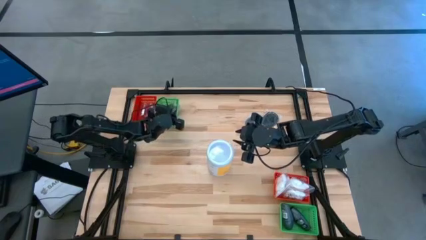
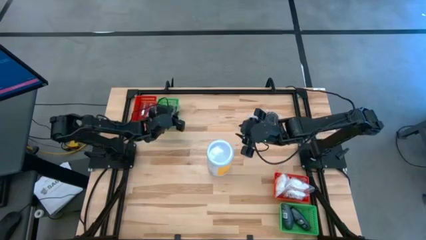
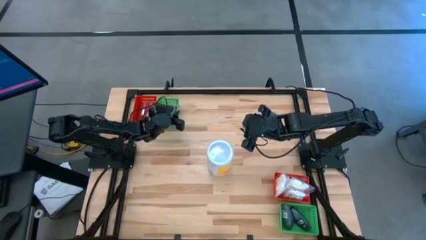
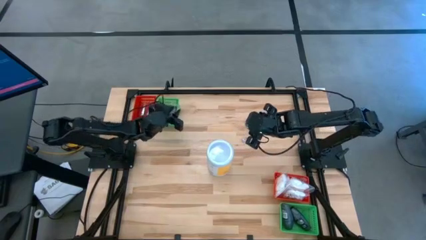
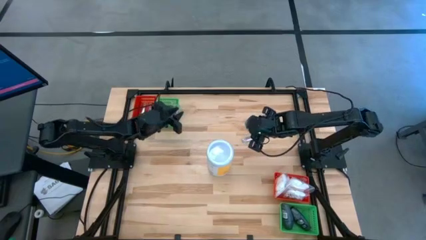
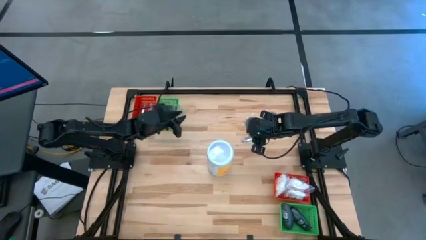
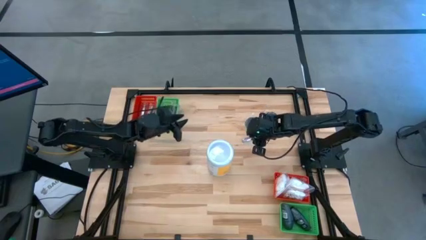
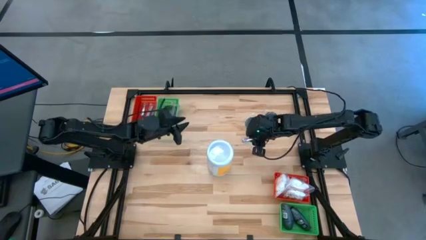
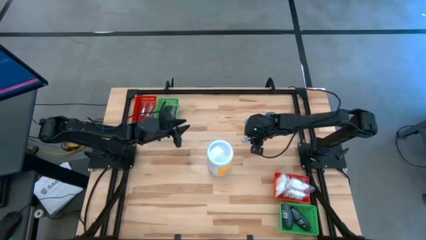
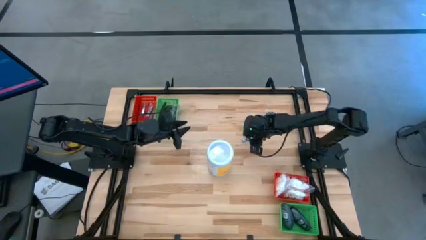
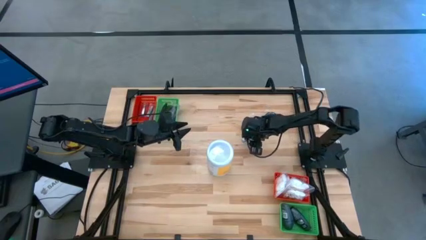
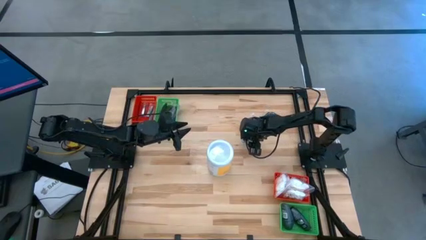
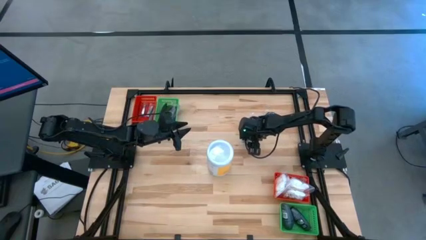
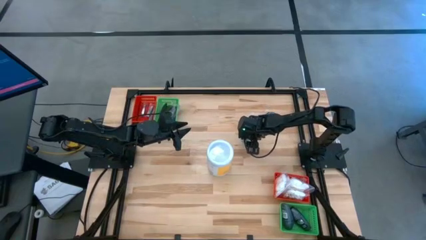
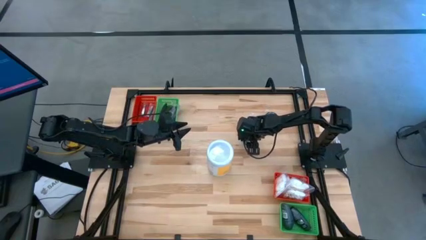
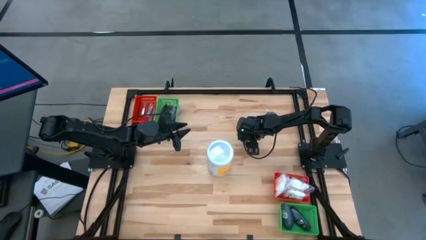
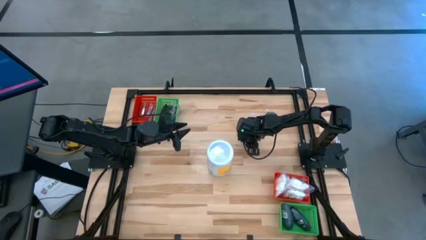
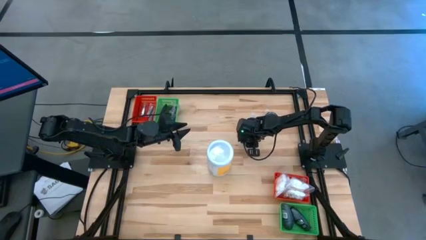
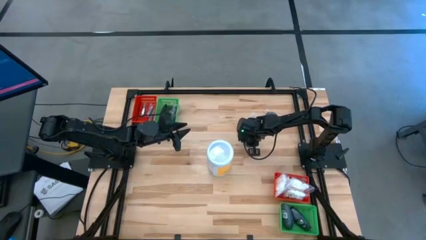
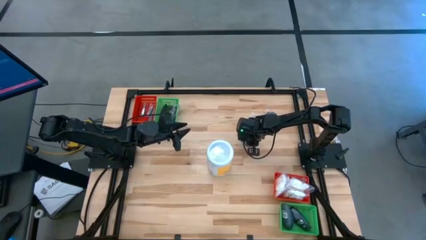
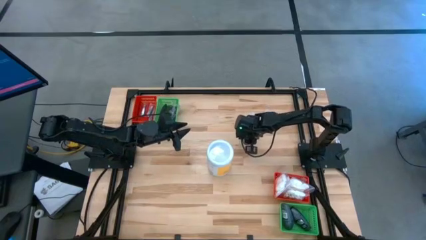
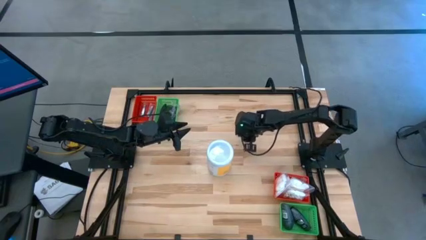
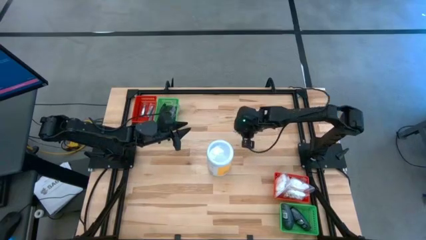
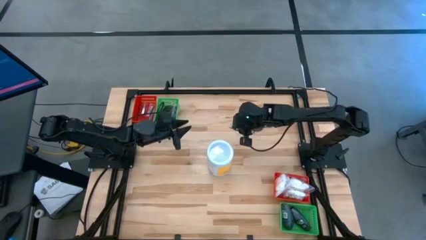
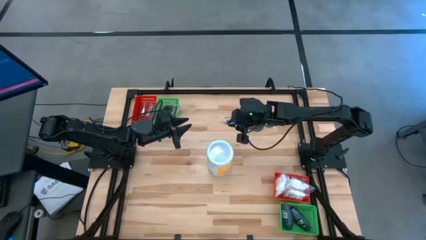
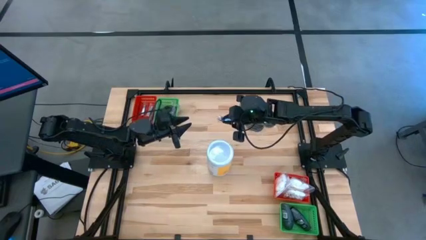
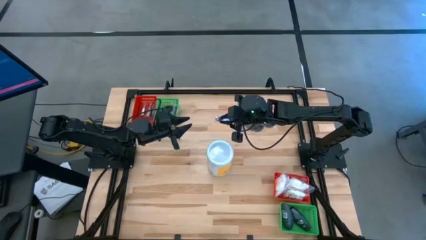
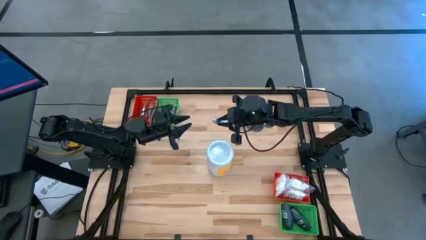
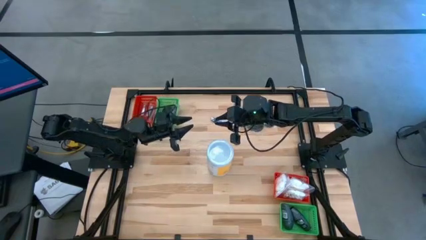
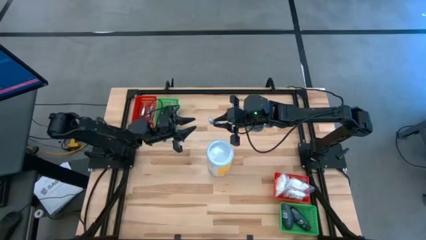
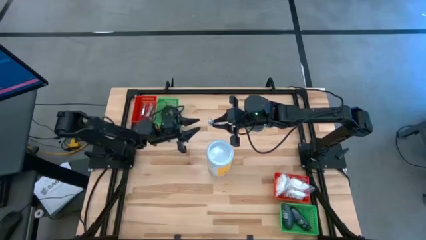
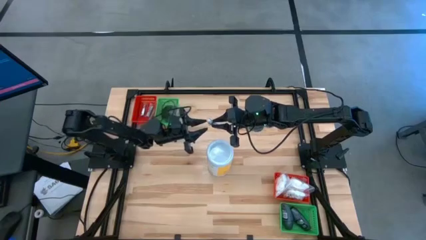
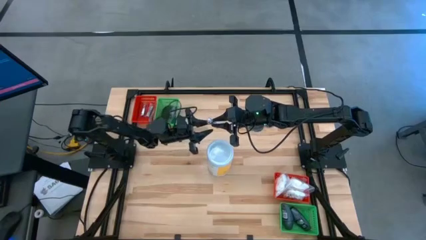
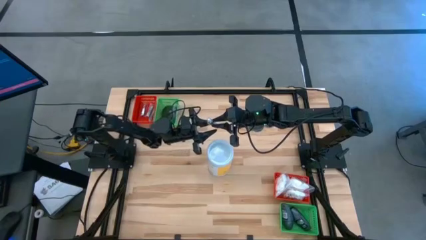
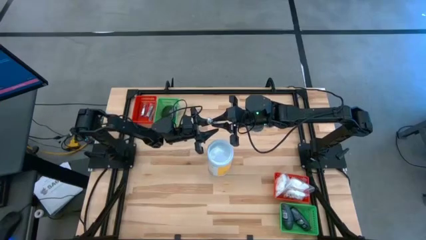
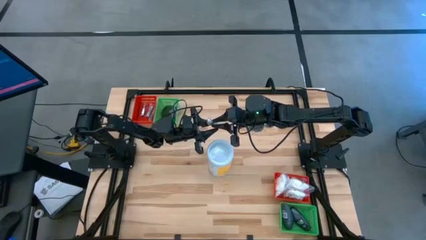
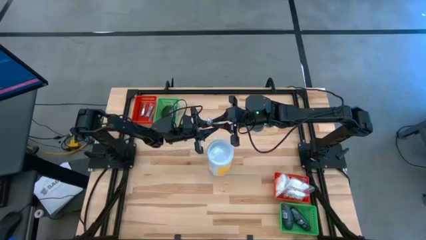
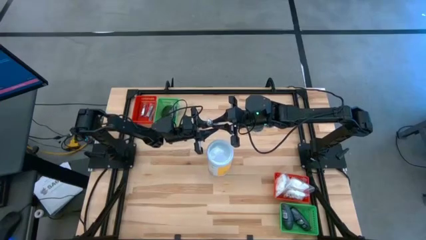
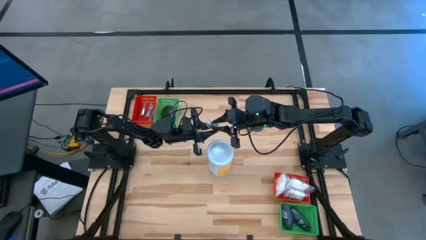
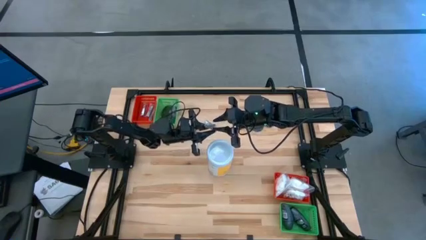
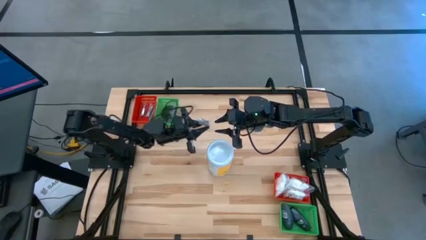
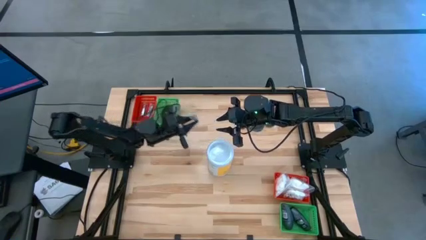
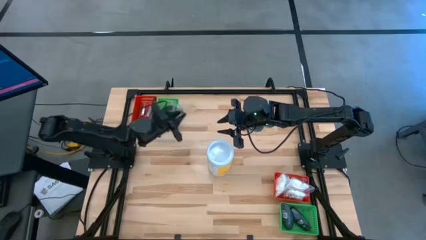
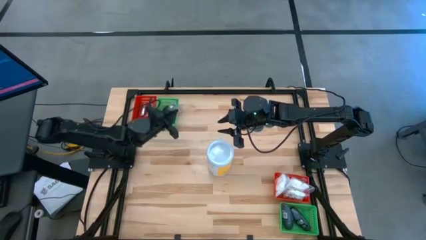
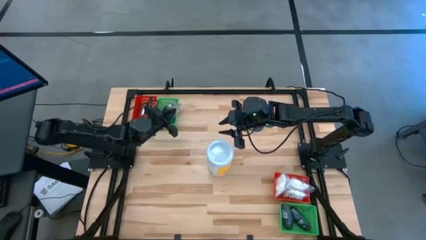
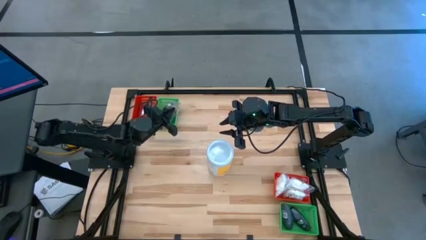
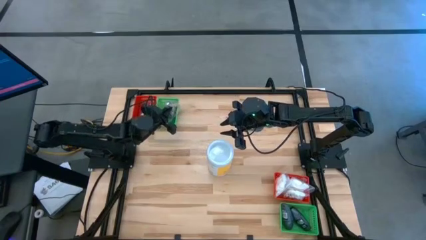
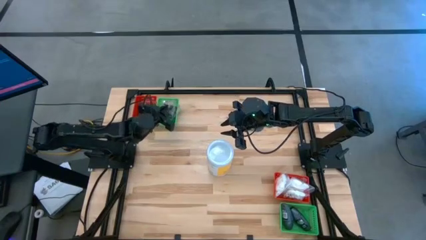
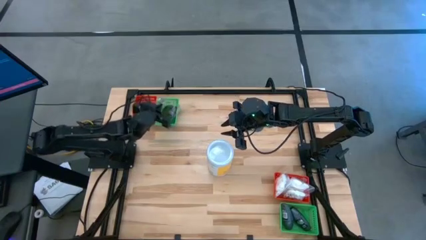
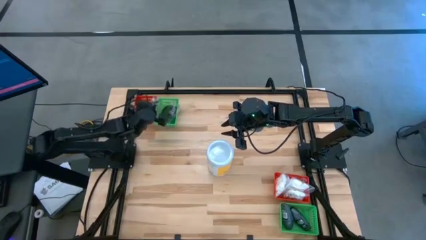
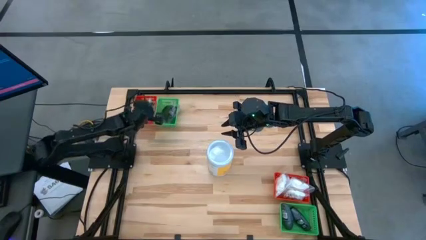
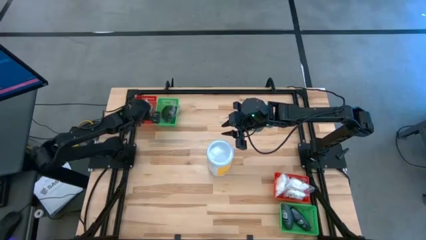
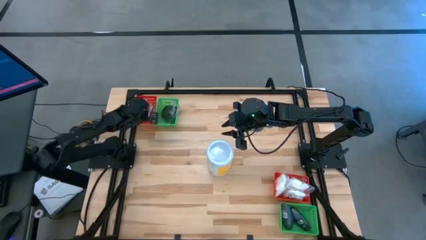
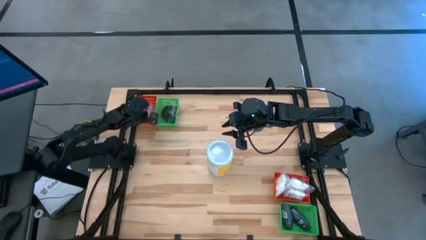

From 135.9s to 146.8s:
Task: Pick & Place Travel size toiletries
Put the silver nail clipper into the top red basket

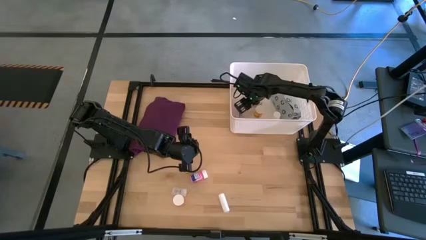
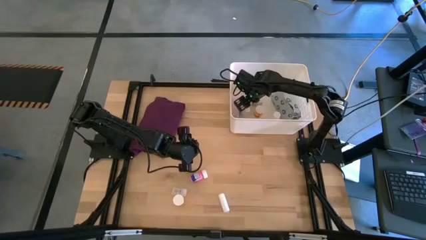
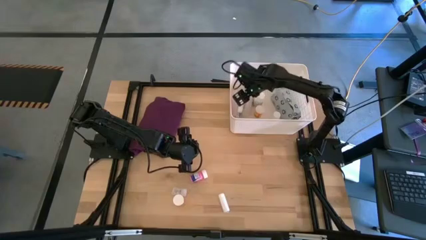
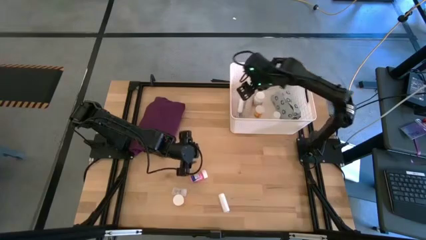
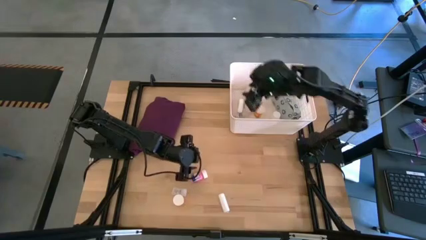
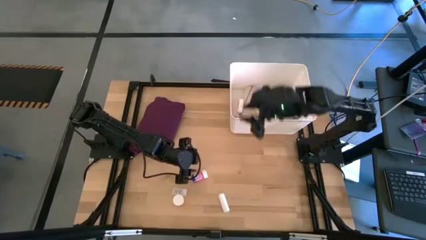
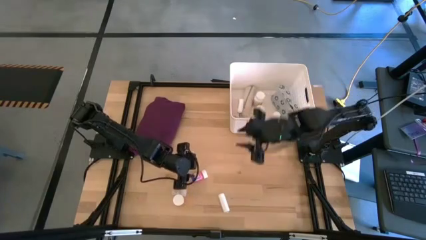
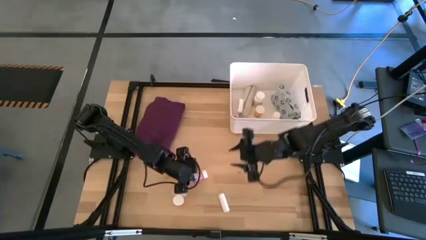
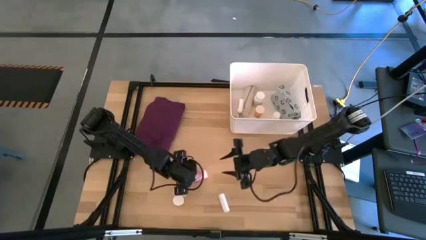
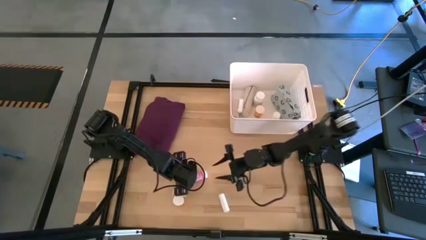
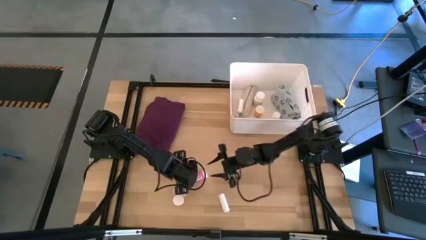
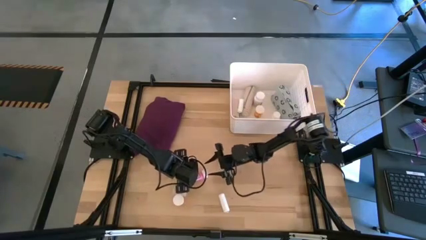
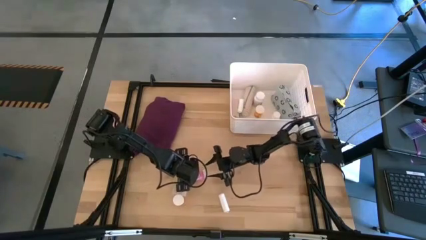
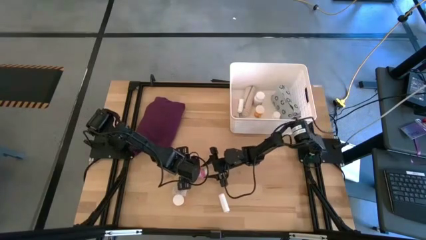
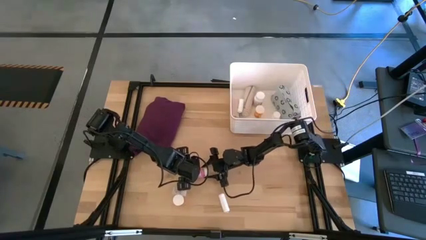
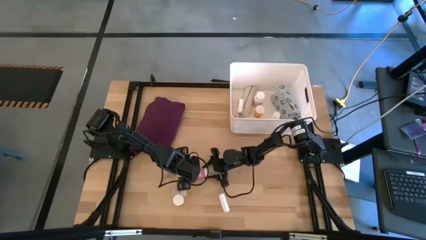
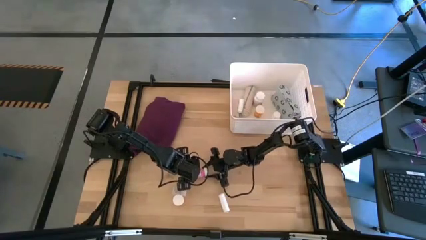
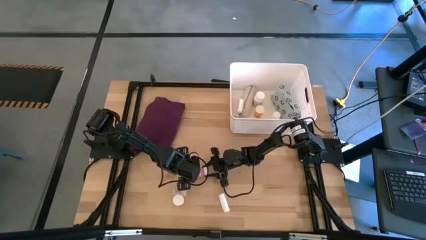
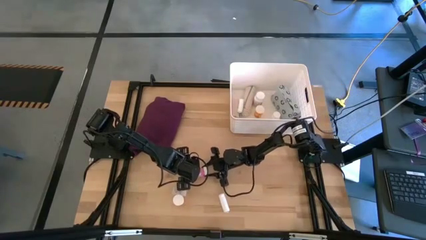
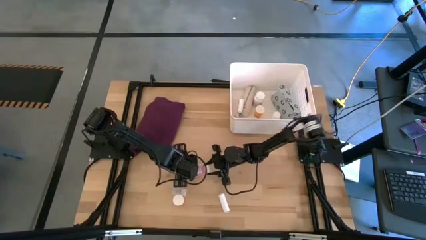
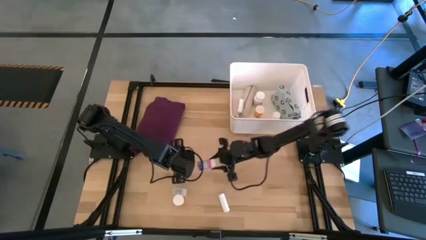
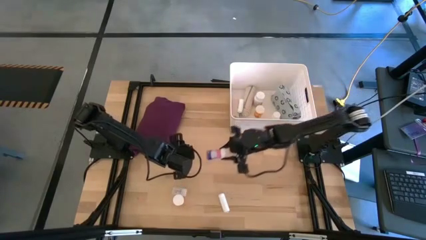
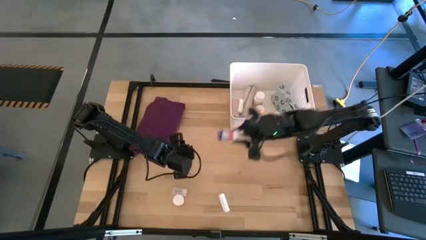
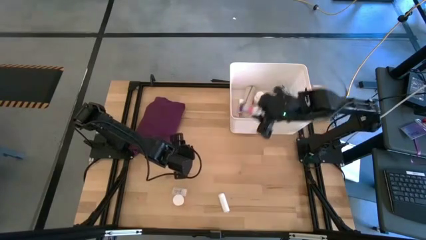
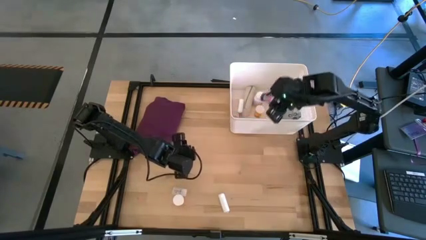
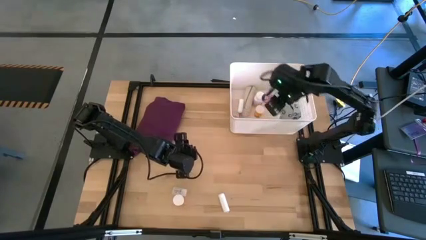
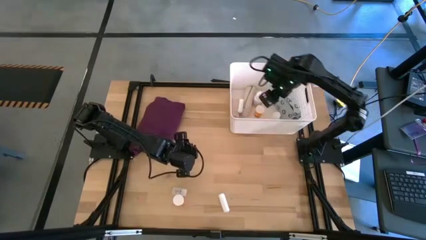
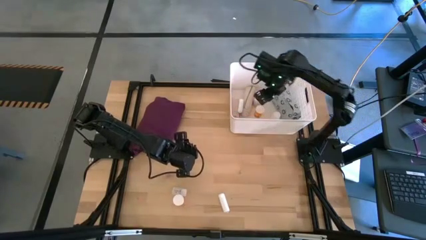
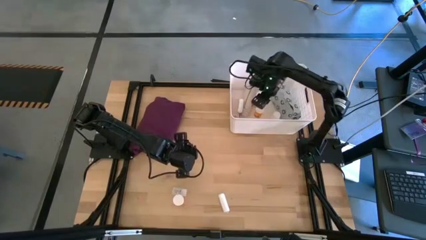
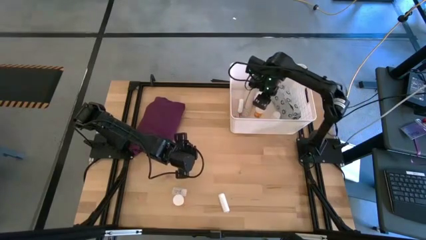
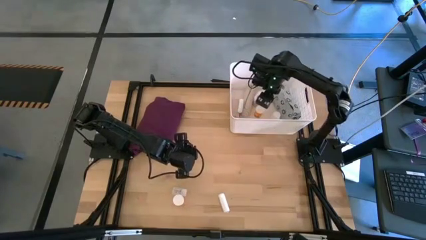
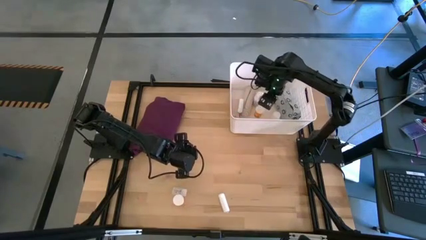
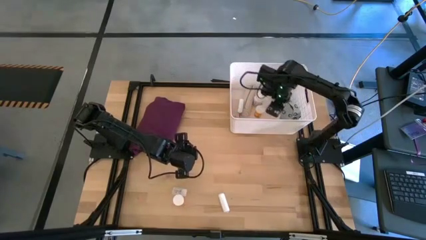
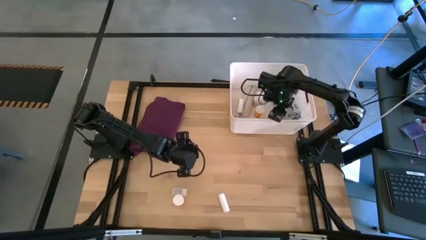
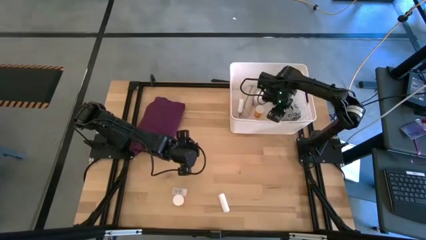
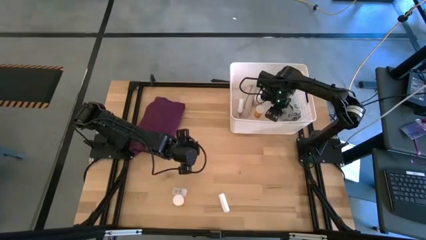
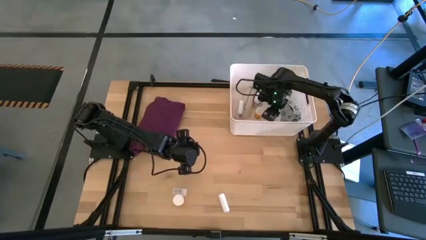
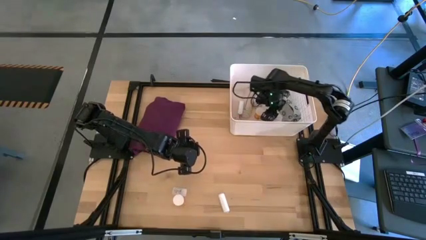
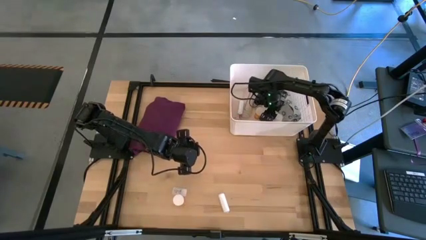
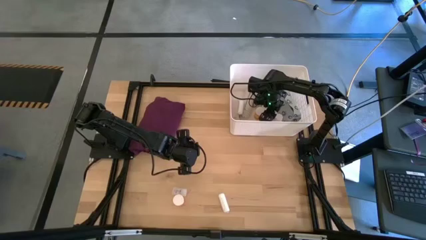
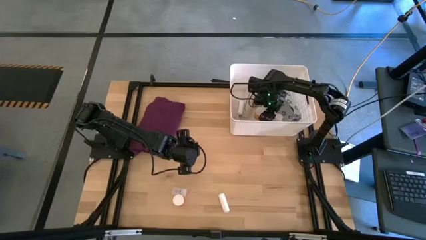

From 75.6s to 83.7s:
Task: Pick & place medical supplies in basket/bin
Put the pink pill bottle into the white bin
